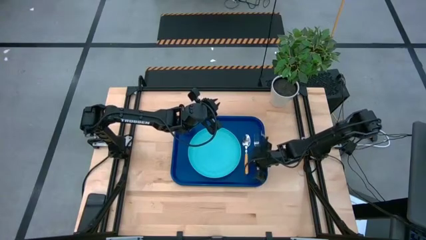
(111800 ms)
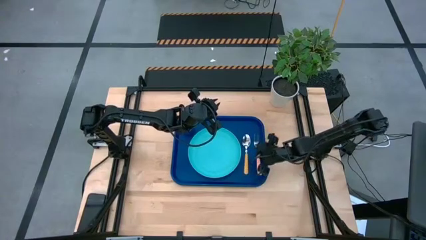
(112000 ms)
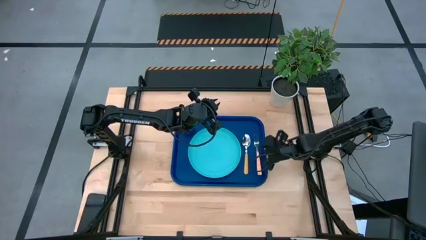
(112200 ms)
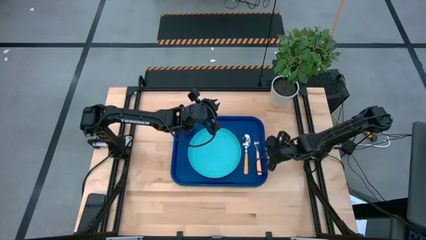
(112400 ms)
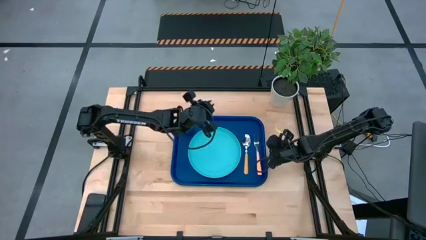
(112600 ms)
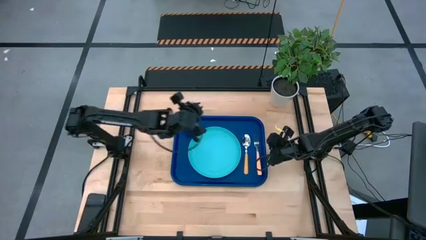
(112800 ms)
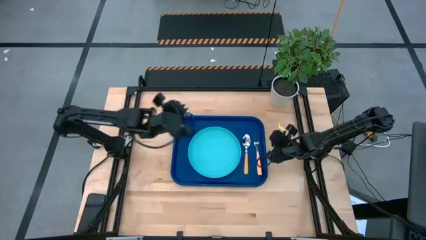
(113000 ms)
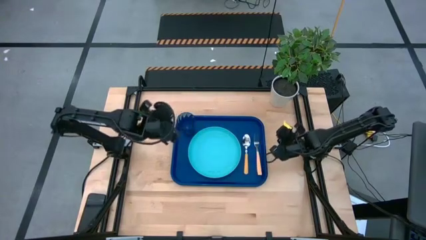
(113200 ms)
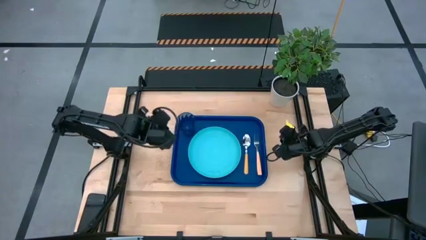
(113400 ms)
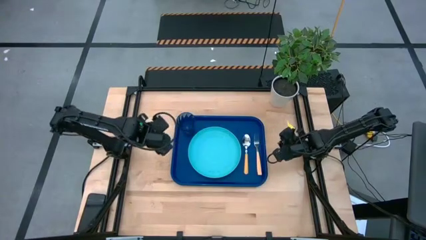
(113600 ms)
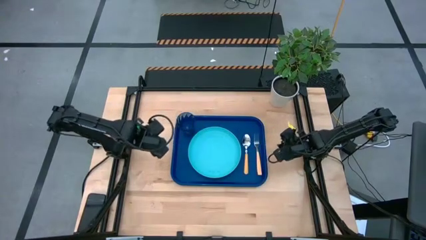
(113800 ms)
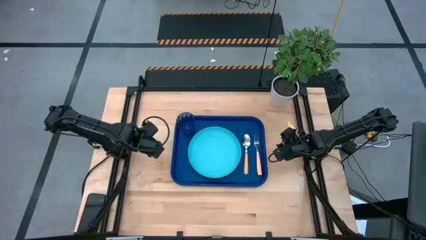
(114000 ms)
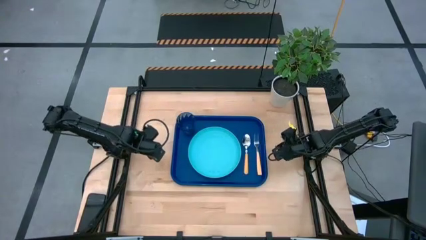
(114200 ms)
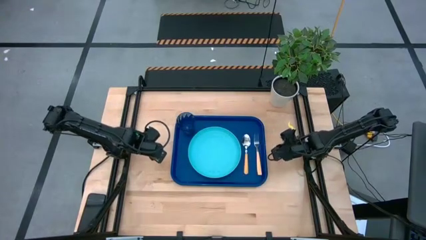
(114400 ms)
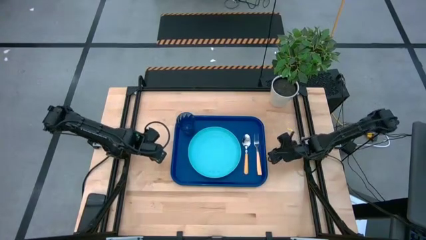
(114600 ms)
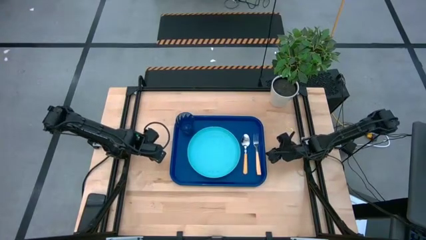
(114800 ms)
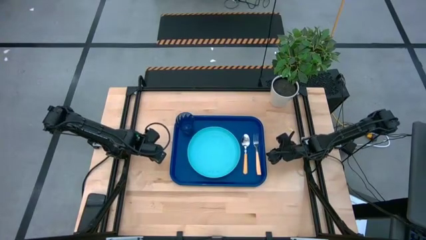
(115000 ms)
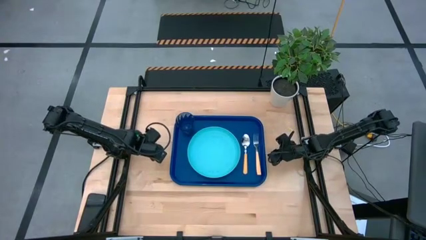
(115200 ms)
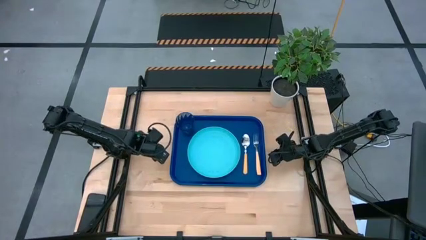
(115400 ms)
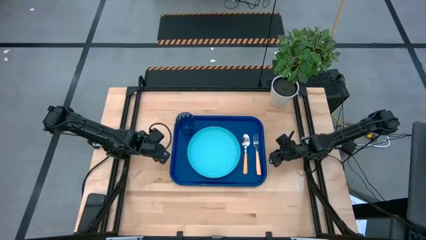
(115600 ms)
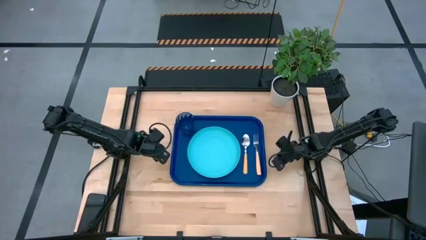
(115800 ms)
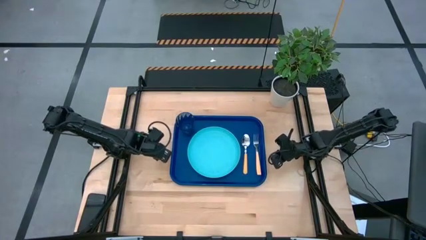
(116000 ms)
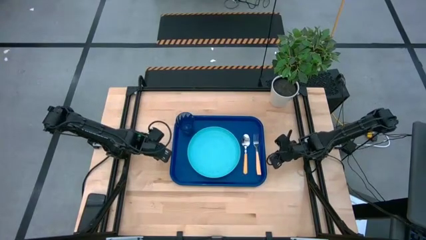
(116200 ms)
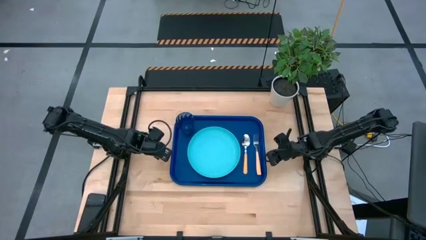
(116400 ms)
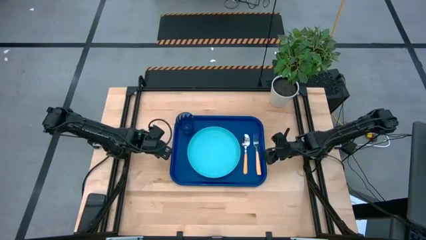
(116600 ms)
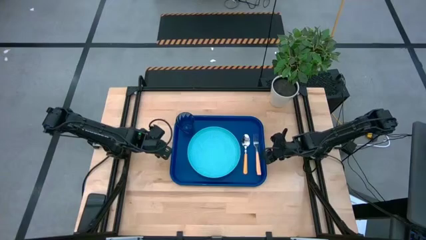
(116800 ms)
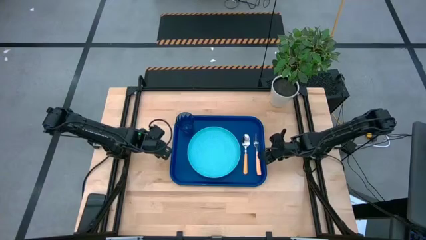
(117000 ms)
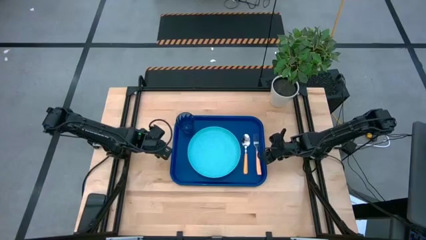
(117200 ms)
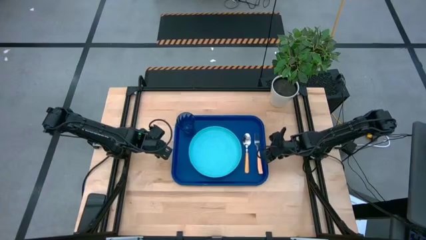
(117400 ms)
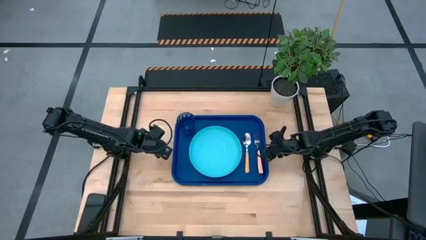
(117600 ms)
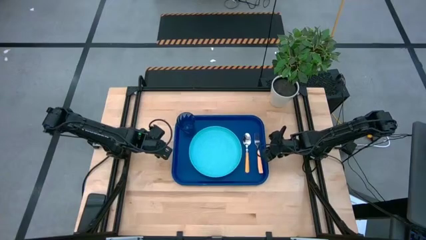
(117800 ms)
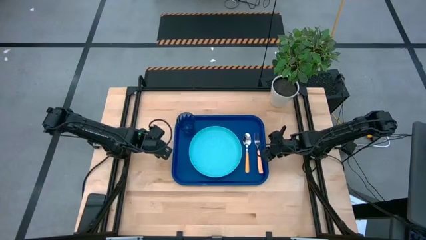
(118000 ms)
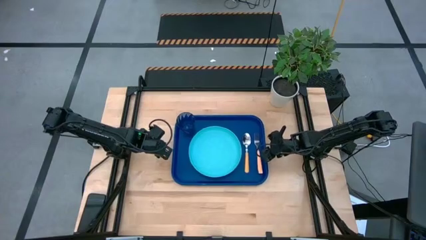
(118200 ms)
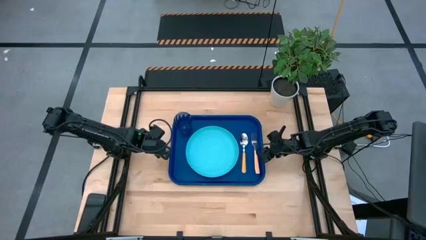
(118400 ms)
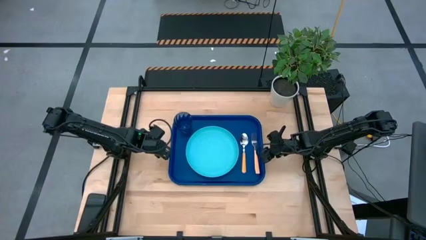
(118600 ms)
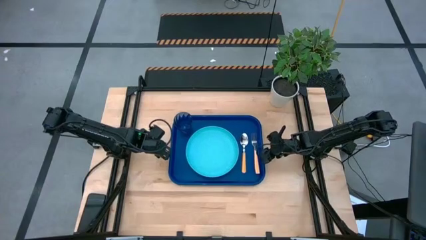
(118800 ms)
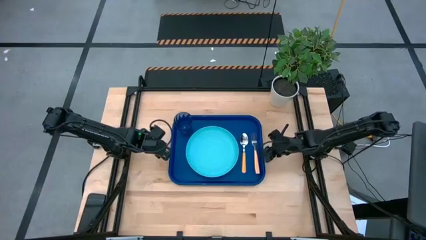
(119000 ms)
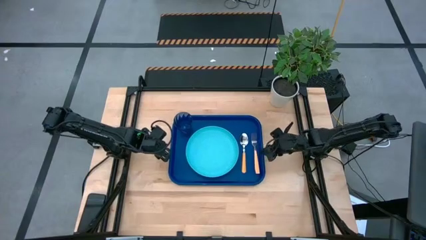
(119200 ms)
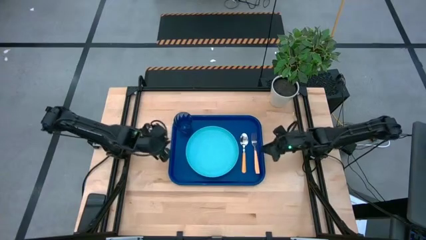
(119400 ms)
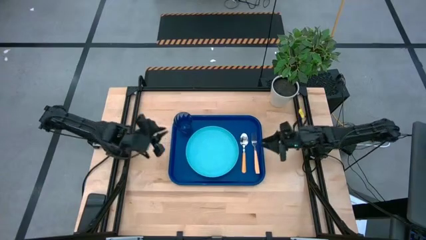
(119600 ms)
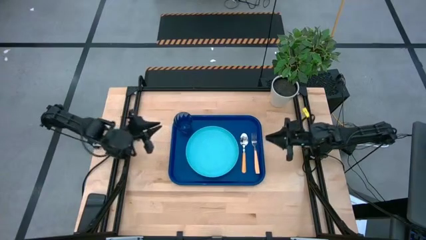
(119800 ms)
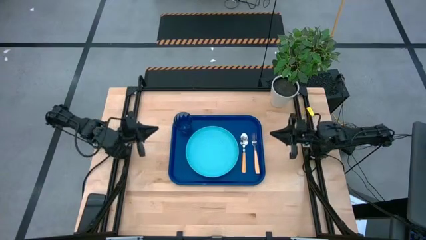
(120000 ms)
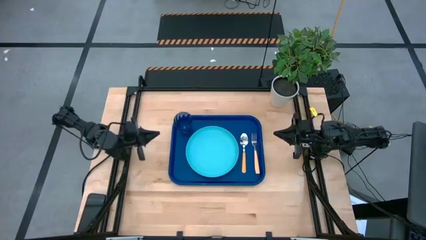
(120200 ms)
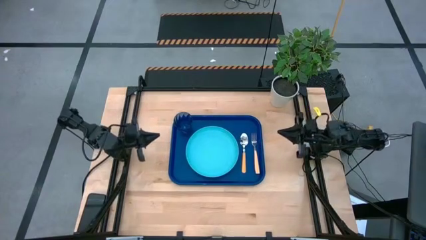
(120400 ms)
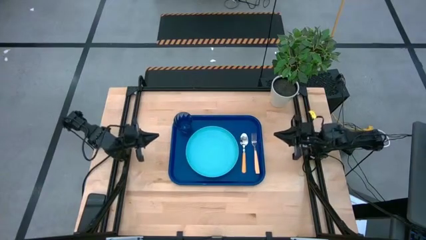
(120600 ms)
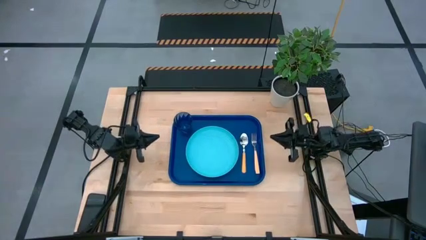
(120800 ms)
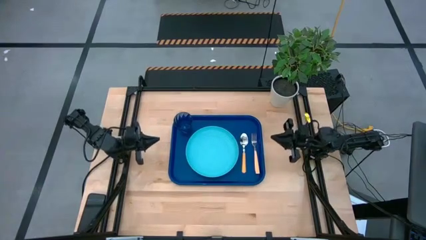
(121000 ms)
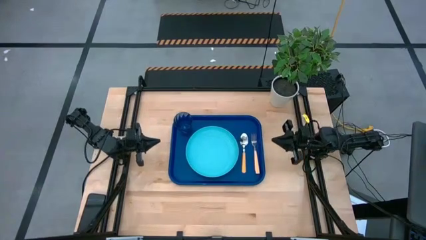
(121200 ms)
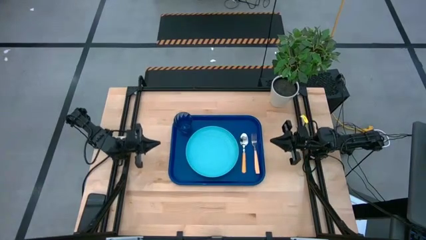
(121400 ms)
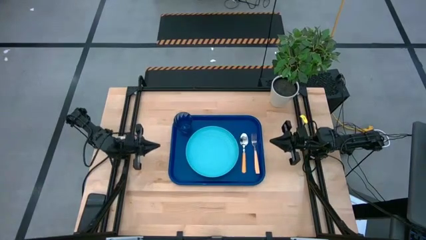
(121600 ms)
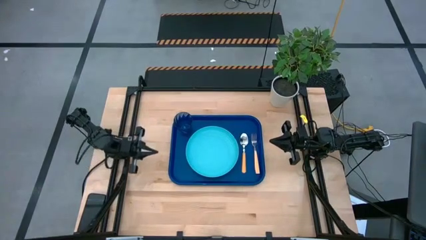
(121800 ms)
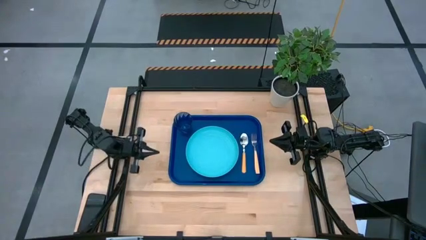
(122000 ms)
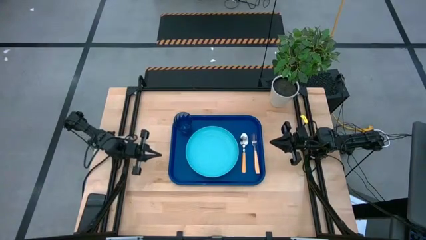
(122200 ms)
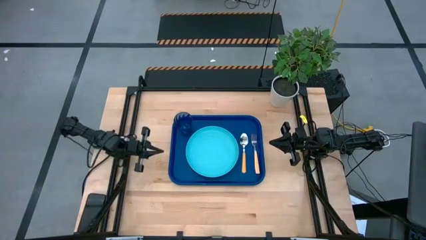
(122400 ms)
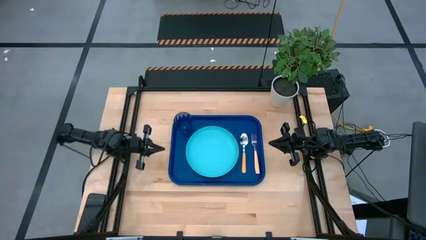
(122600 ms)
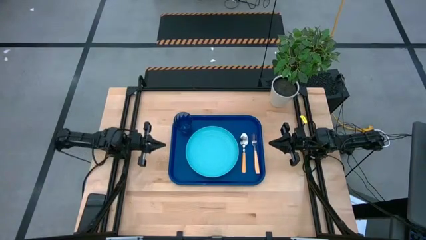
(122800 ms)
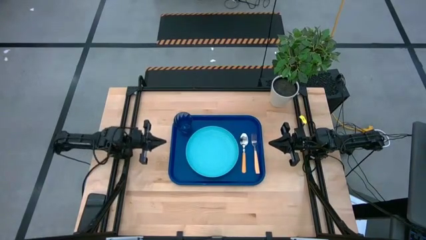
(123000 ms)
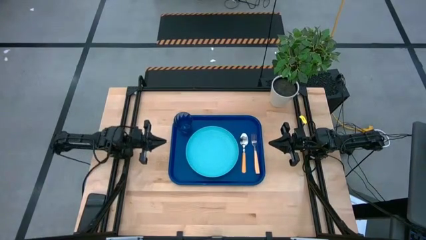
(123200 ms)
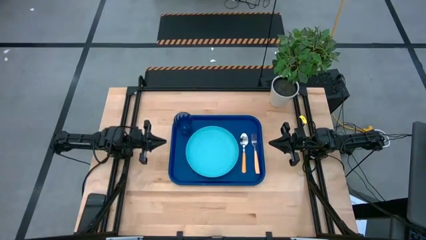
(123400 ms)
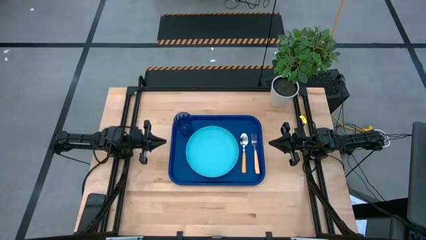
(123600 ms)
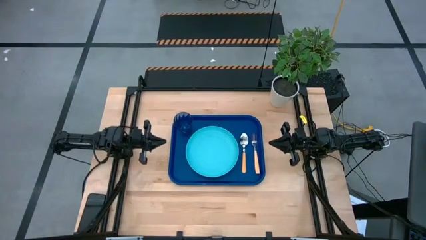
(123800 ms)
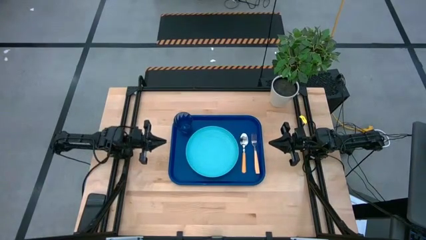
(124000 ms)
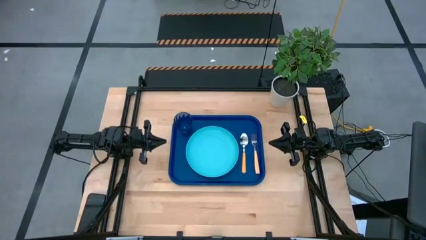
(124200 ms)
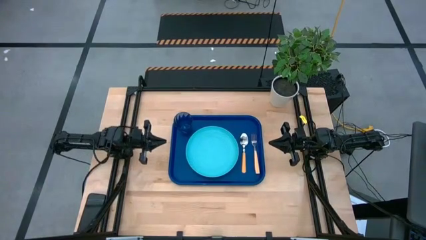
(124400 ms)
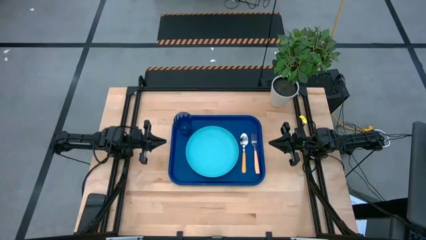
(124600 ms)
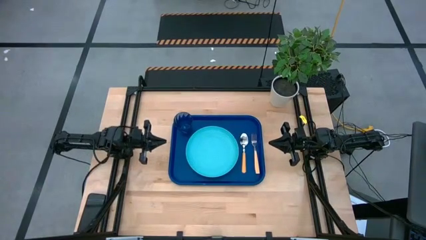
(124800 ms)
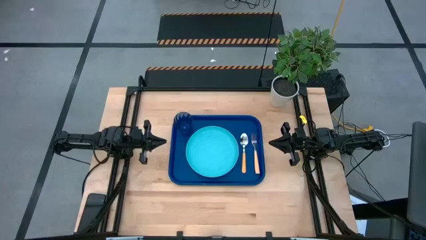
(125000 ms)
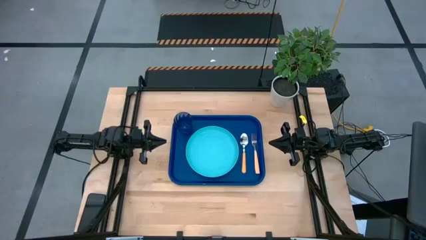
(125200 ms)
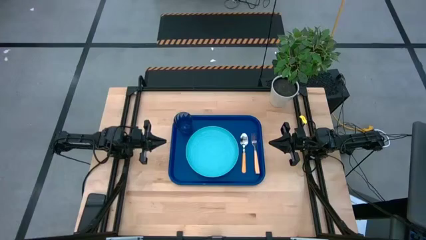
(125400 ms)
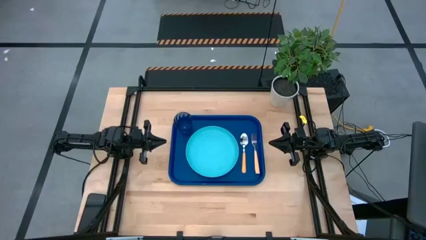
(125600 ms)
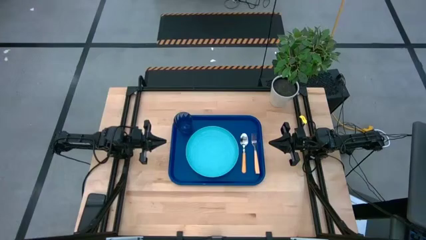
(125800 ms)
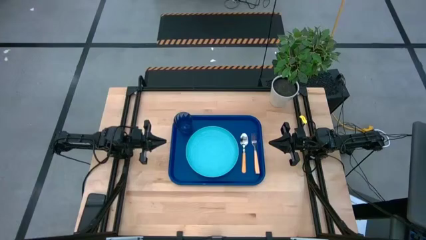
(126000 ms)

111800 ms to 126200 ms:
Task: Pick and place plate/cup/fork/spoon on tray
Return to Home Position
